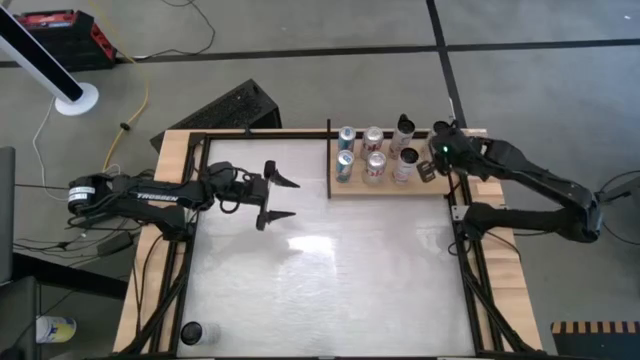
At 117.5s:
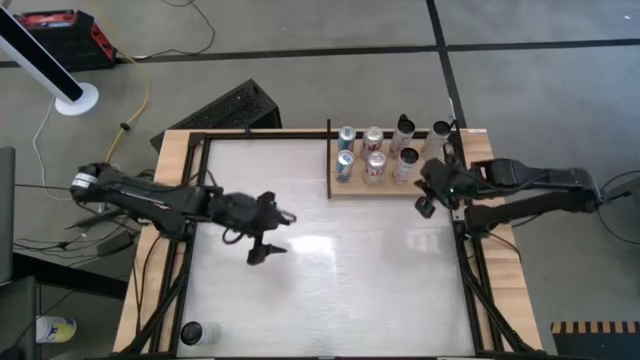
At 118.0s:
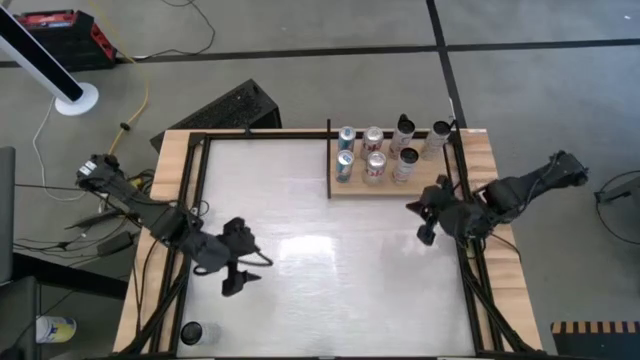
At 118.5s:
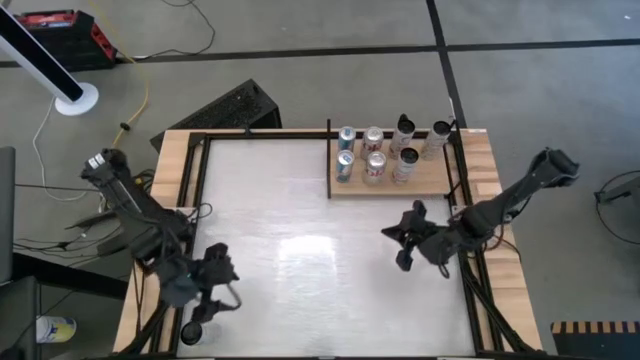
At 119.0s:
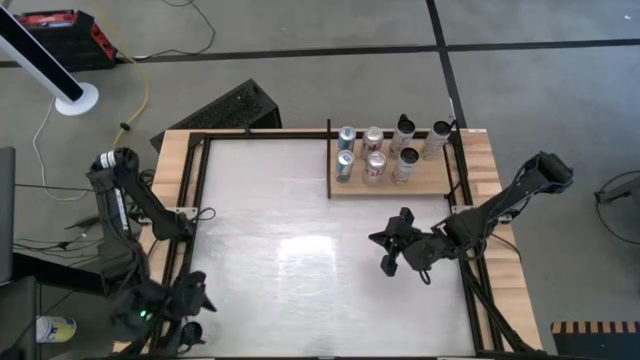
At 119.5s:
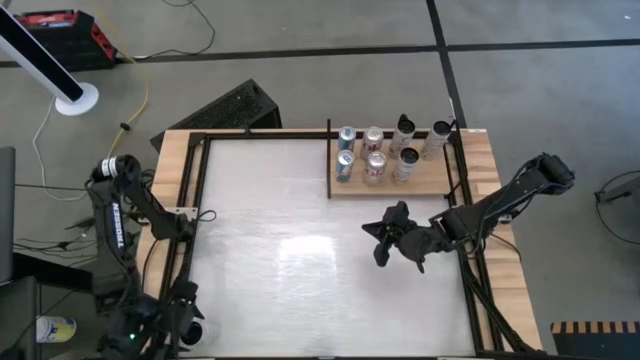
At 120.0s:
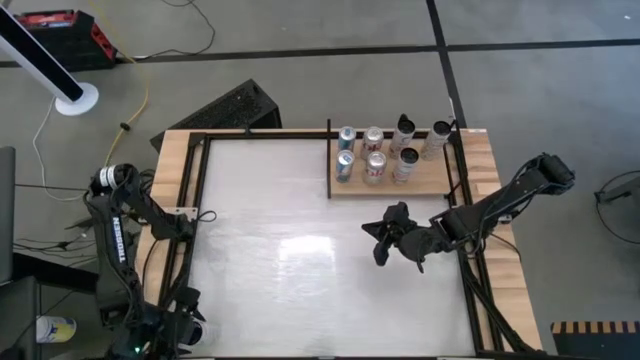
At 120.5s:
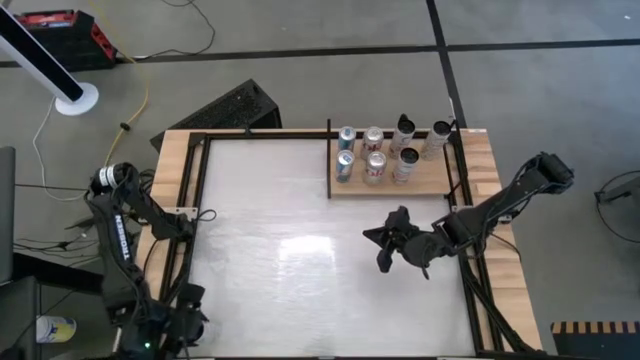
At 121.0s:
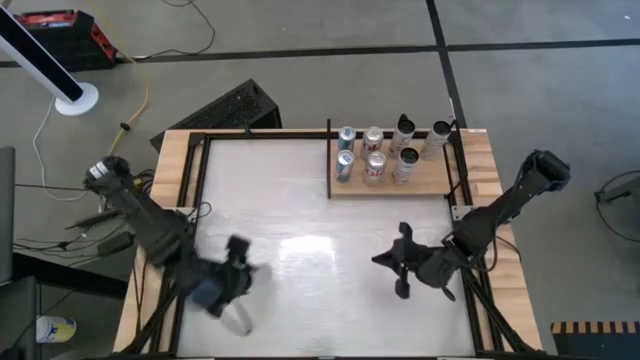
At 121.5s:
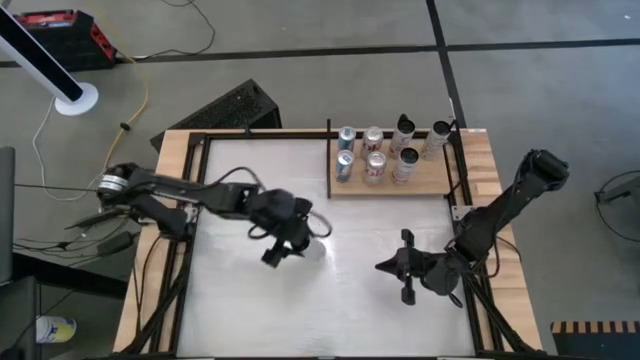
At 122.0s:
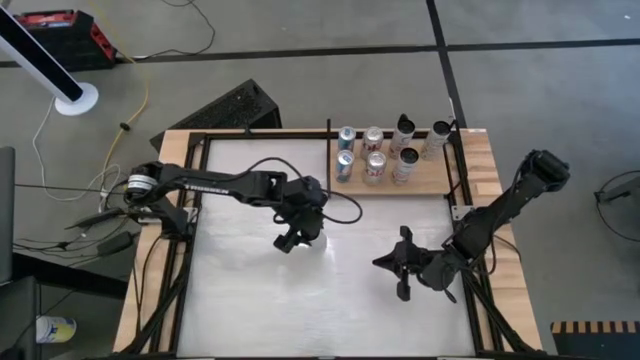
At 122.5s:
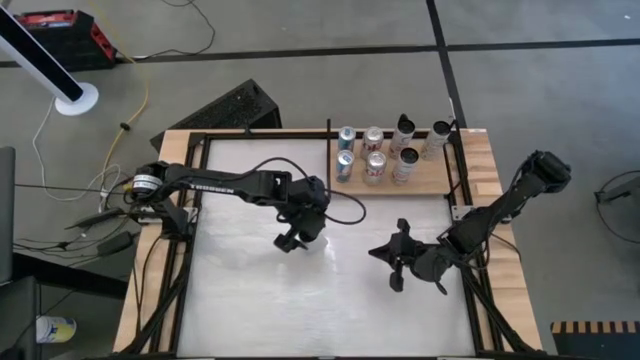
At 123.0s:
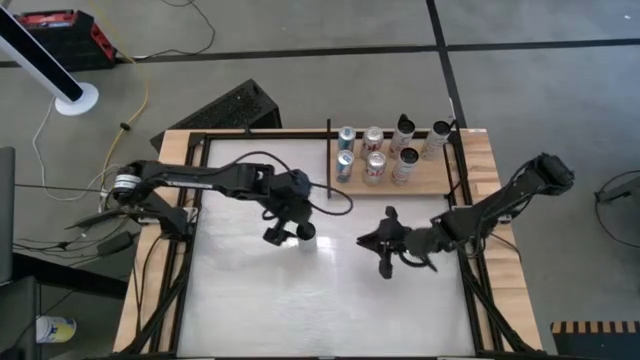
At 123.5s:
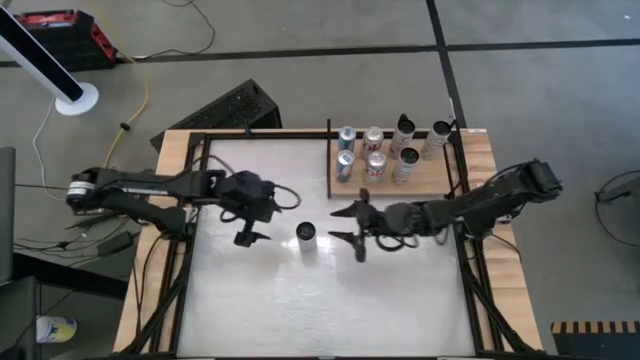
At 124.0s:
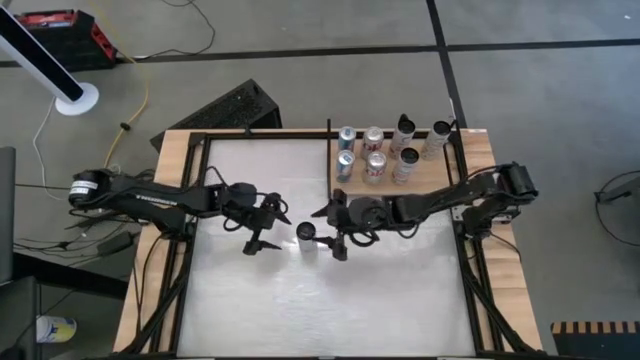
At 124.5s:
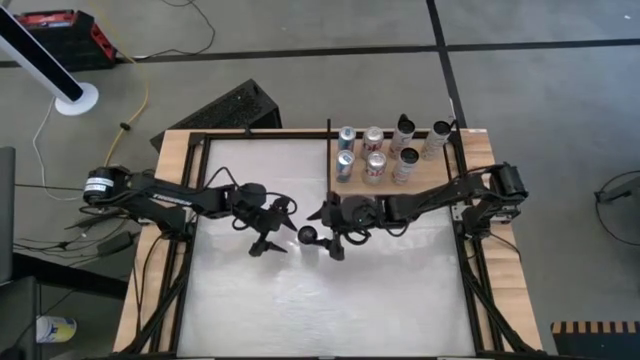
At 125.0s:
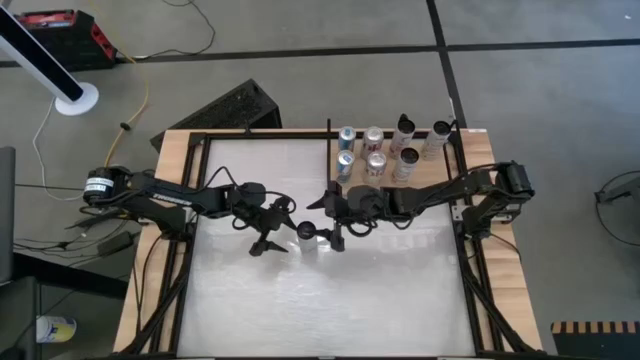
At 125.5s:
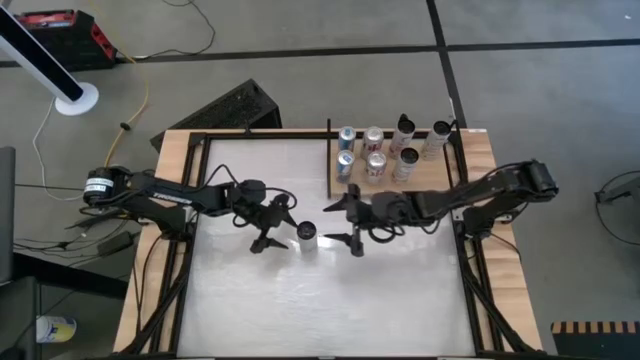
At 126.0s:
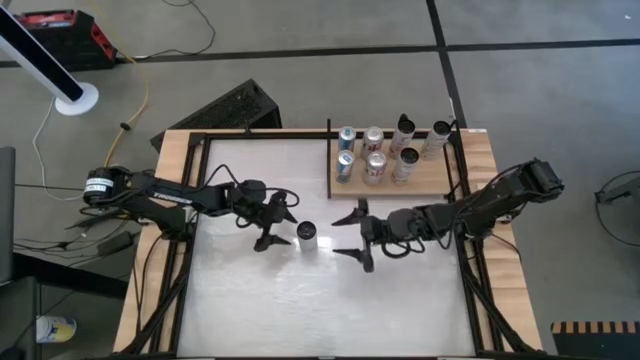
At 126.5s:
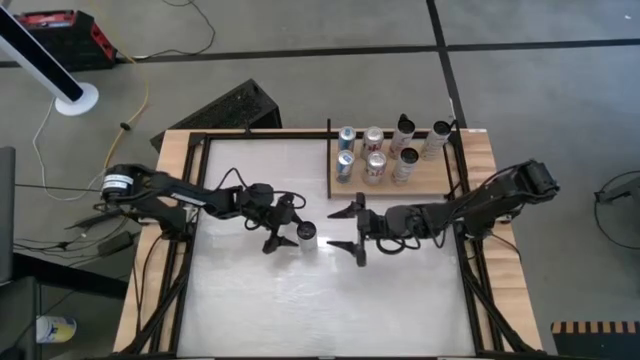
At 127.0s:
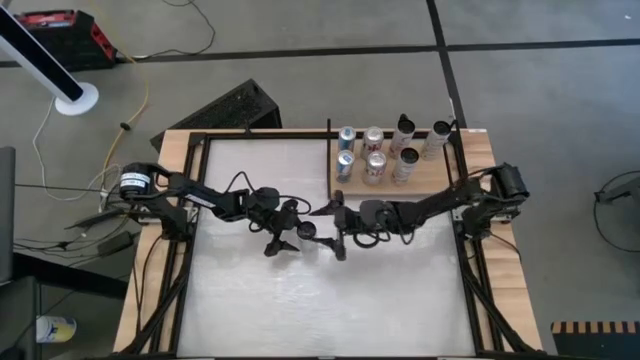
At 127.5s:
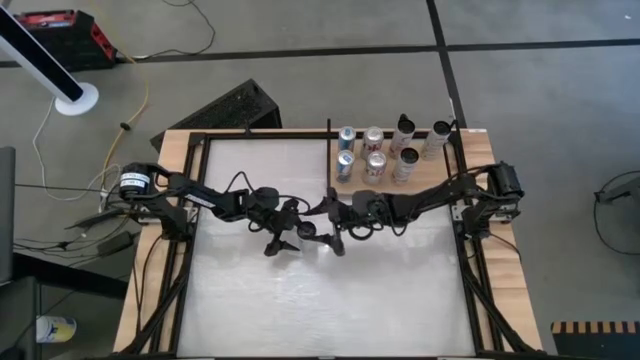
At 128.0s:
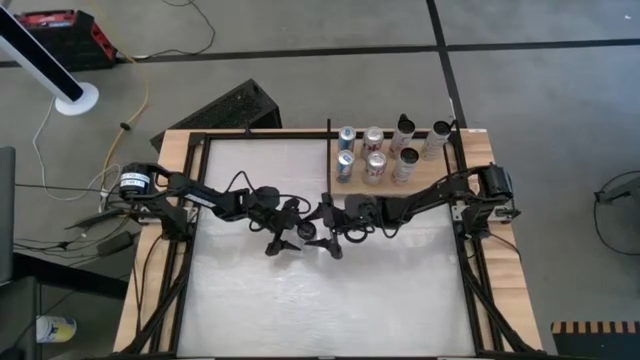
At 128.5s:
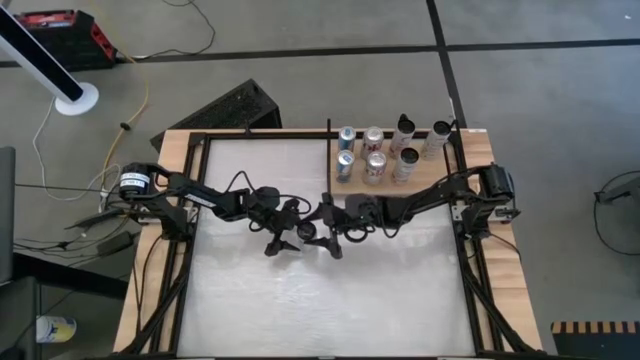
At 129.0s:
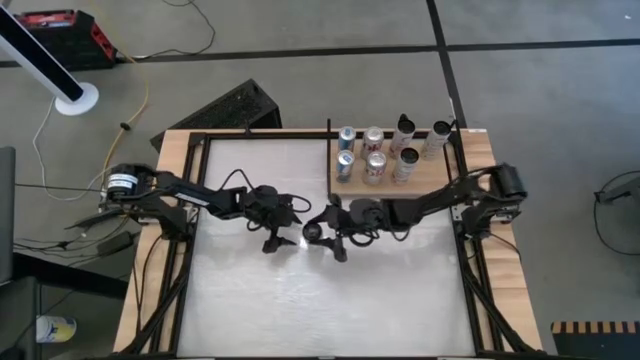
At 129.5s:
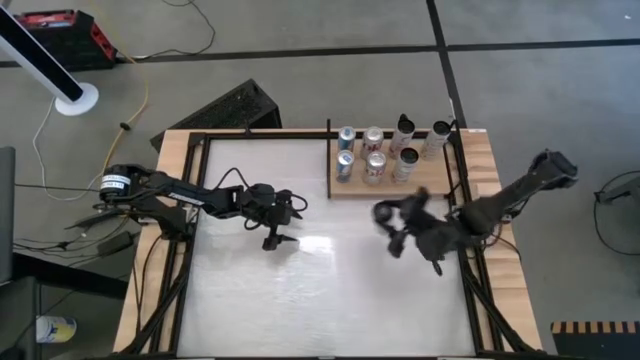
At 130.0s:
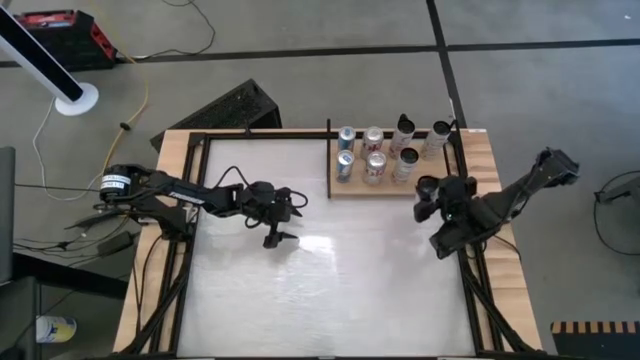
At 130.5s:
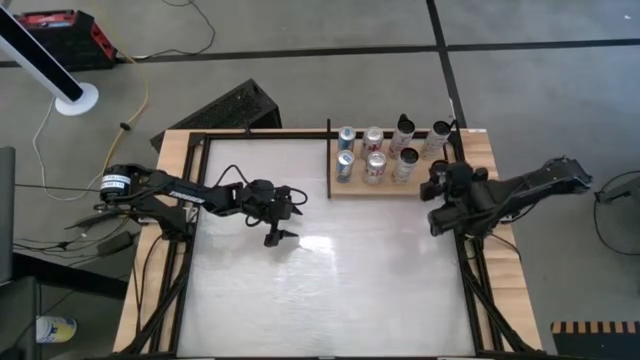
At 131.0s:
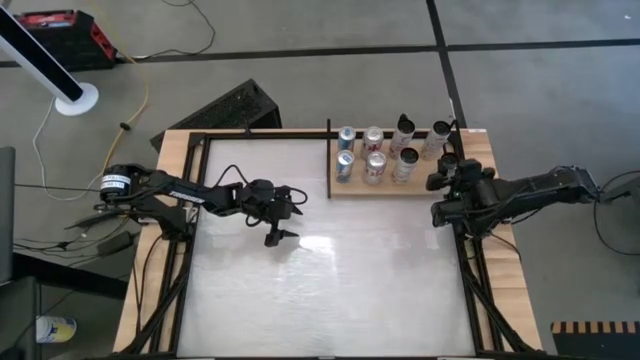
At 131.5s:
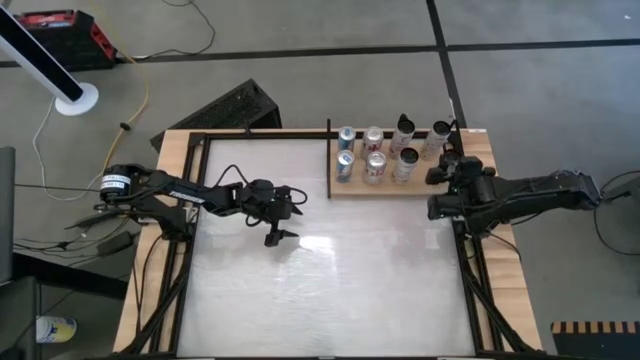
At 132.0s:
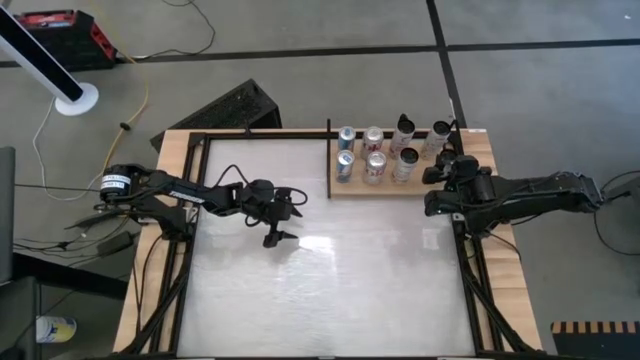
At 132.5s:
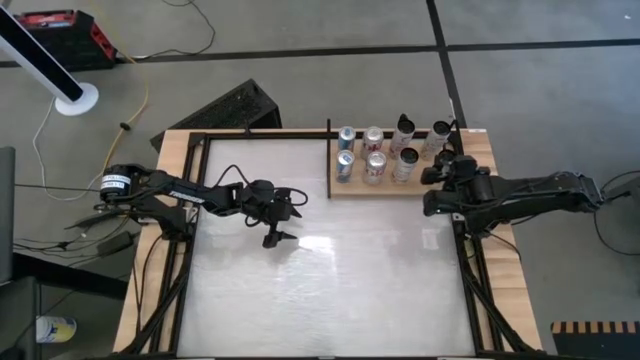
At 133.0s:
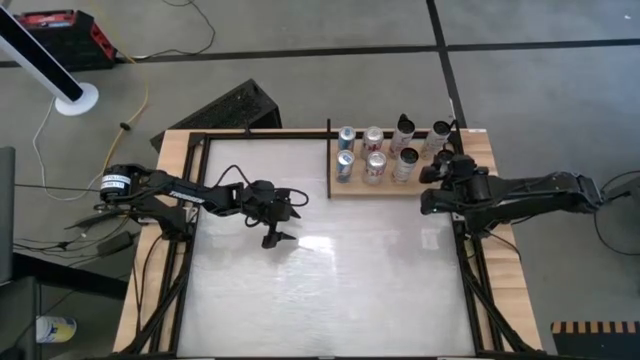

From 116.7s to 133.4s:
Task: Place canned beverage on shelf
Put the white-yellow soda can on the shelf aligned with the other white-yellow soda can

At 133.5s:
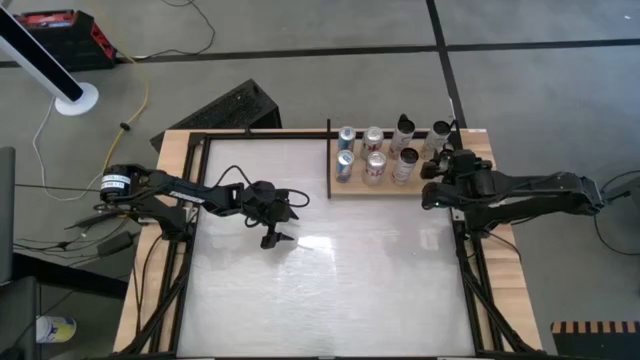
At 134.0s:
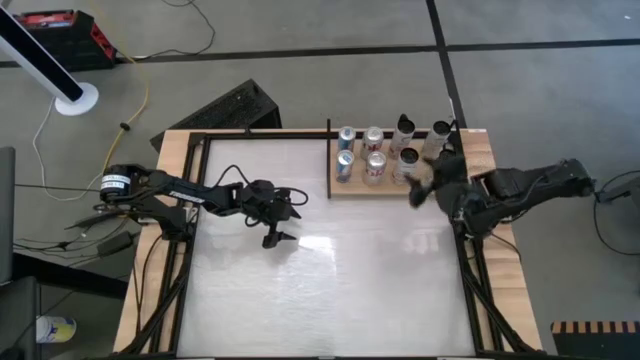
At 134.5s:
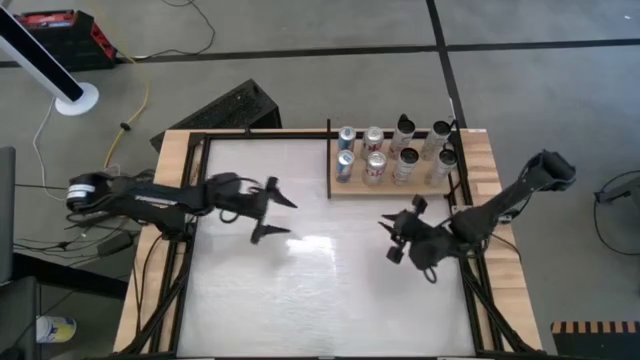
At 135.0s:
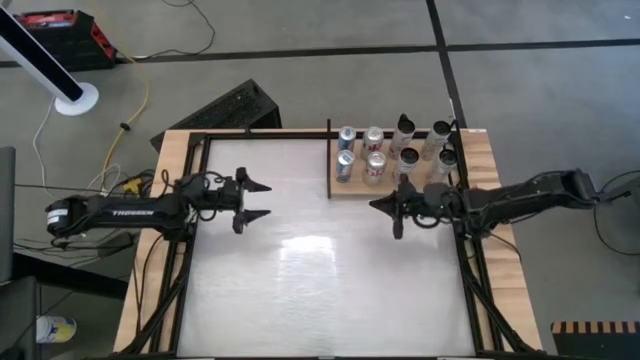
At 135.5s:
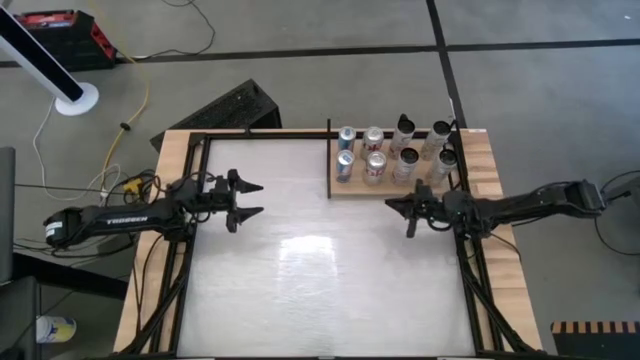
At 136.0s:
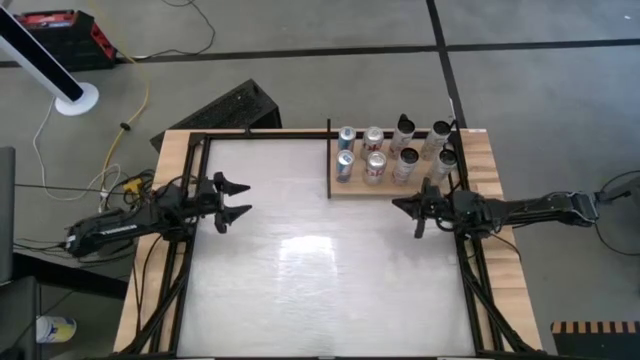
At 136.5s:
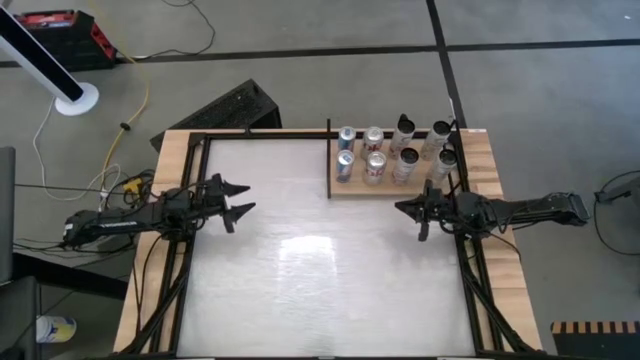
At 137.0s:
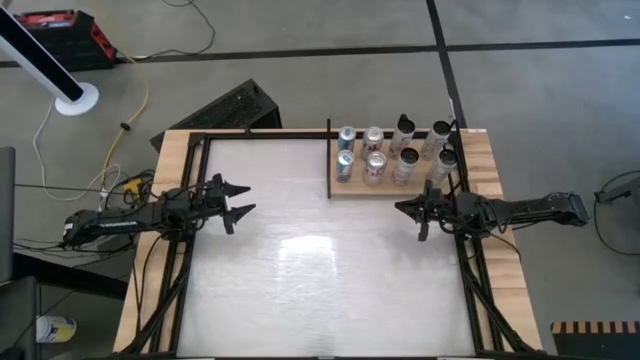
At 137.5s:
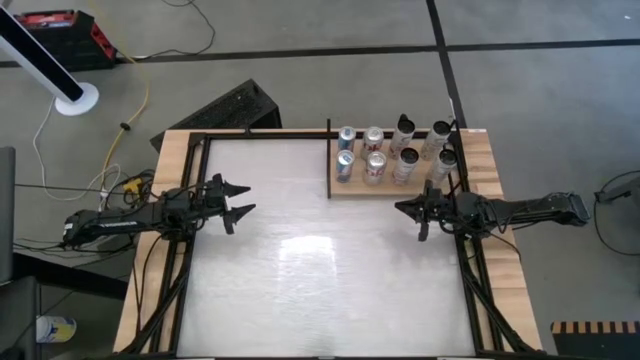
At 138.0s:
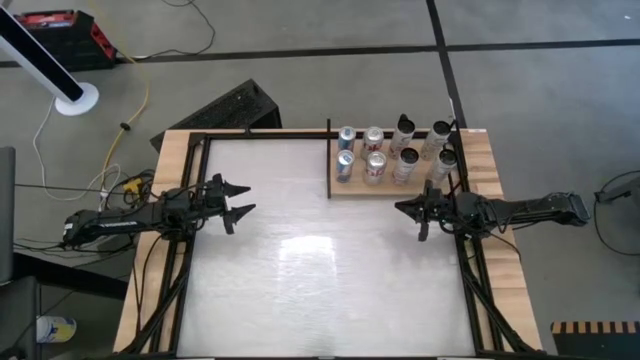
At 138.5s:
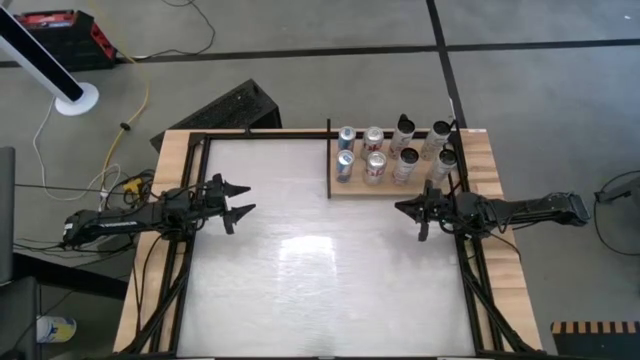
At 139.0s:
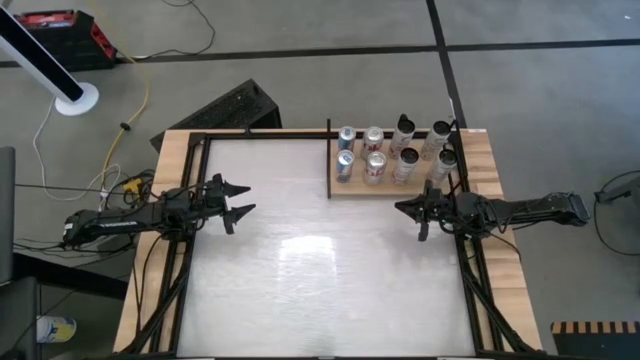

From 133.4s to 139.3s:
Return to Home Position
